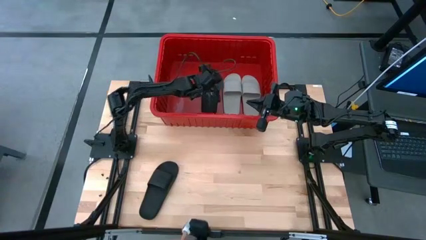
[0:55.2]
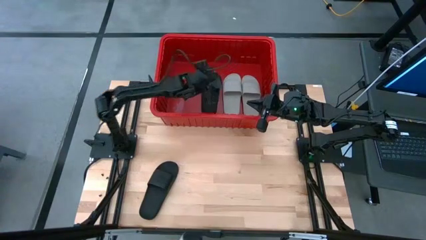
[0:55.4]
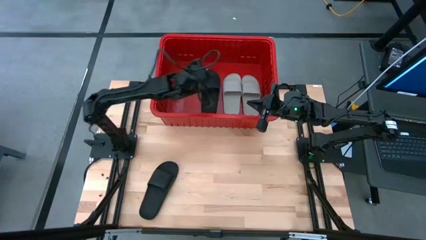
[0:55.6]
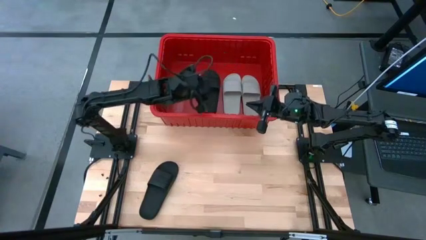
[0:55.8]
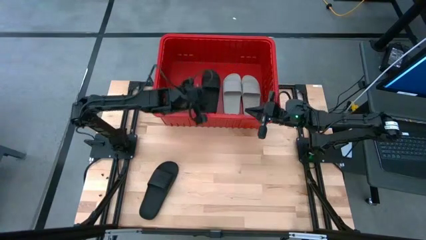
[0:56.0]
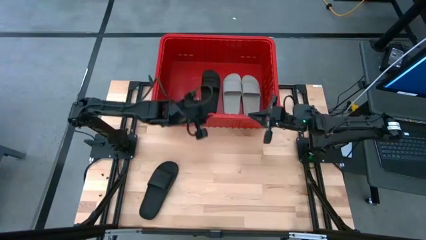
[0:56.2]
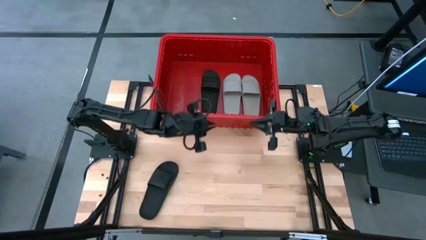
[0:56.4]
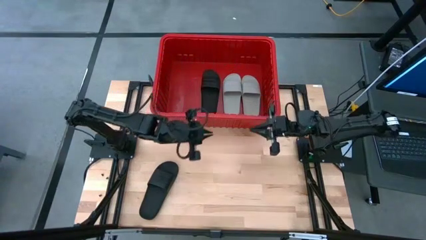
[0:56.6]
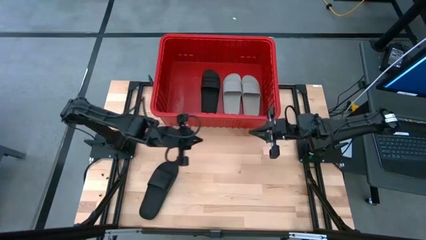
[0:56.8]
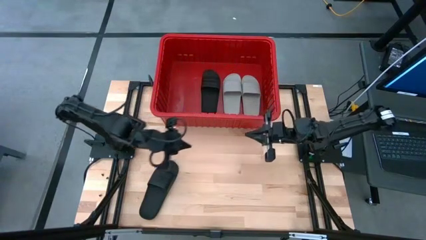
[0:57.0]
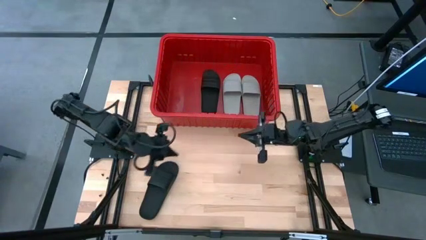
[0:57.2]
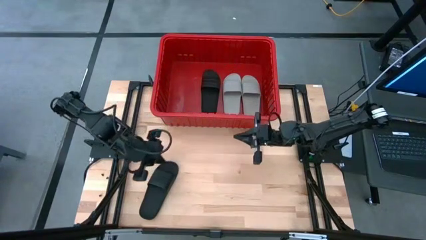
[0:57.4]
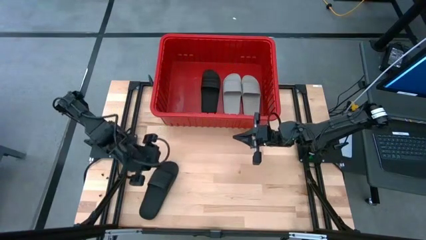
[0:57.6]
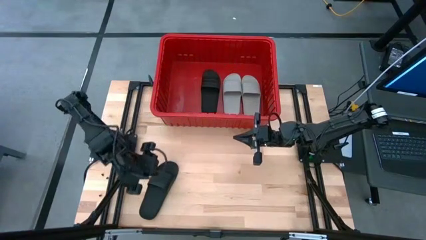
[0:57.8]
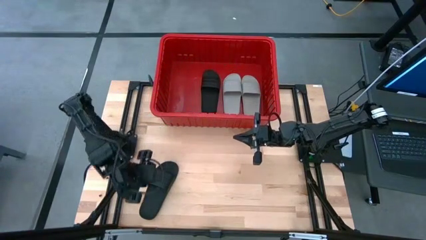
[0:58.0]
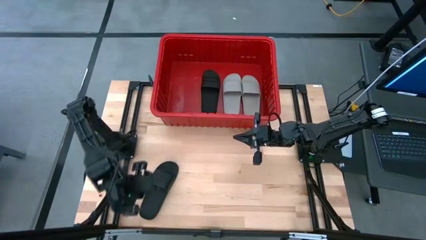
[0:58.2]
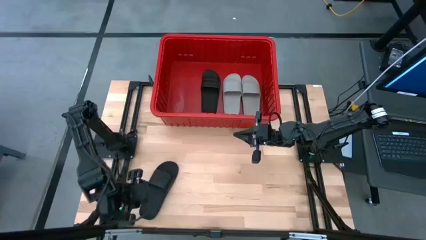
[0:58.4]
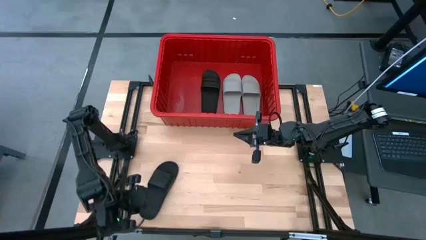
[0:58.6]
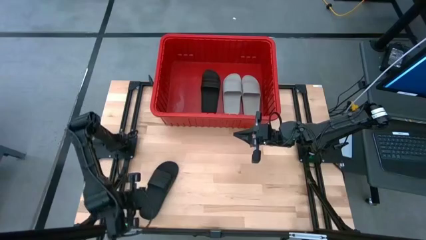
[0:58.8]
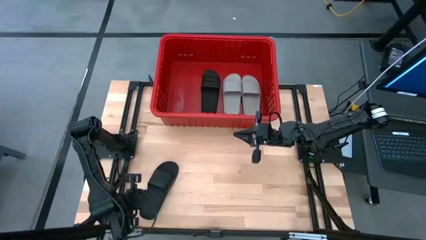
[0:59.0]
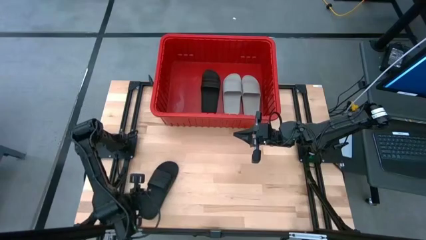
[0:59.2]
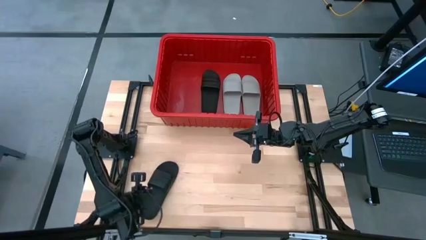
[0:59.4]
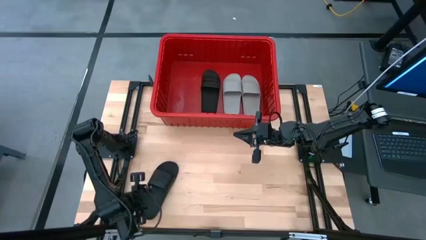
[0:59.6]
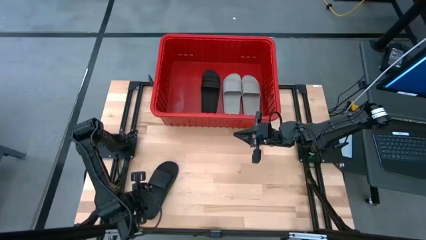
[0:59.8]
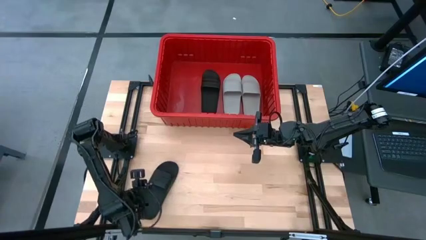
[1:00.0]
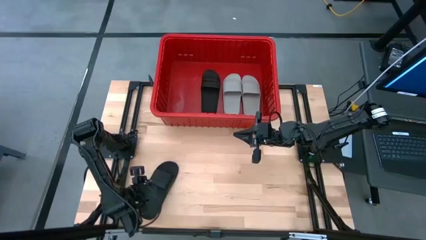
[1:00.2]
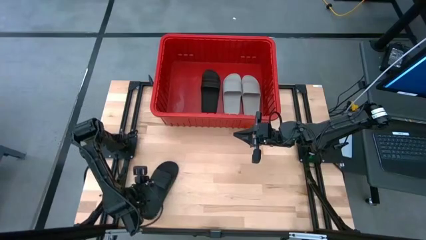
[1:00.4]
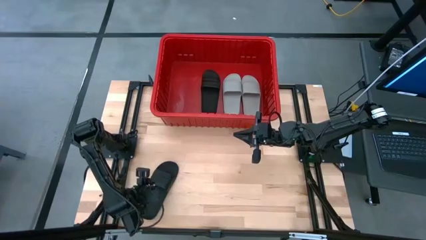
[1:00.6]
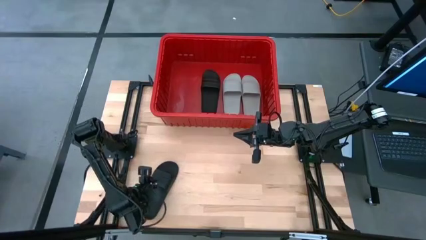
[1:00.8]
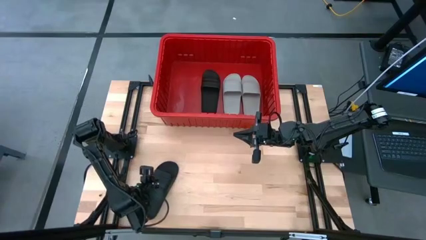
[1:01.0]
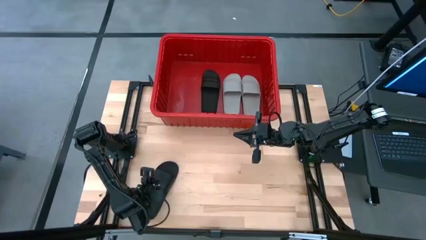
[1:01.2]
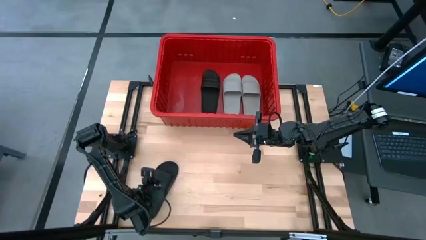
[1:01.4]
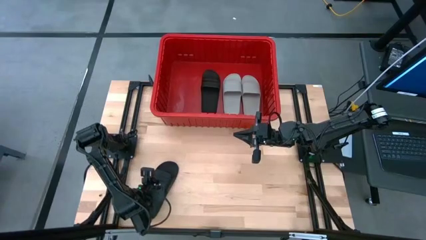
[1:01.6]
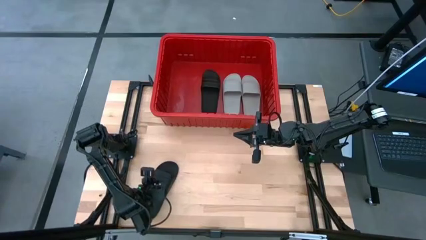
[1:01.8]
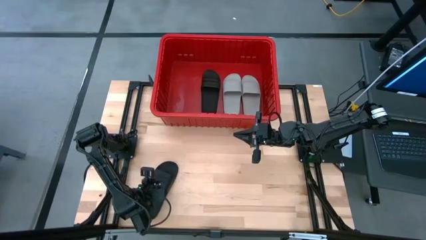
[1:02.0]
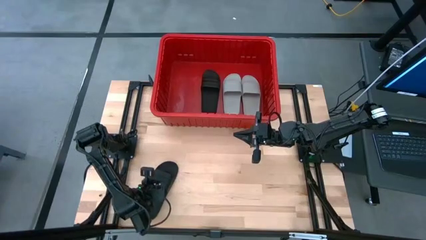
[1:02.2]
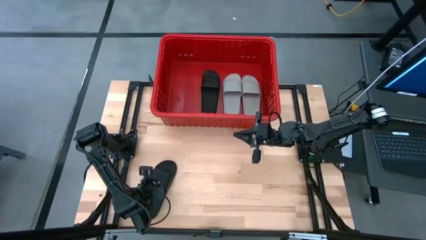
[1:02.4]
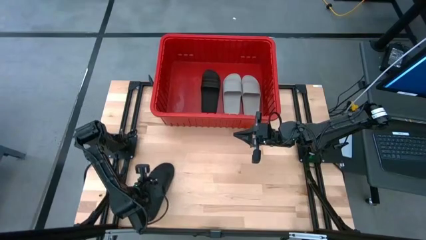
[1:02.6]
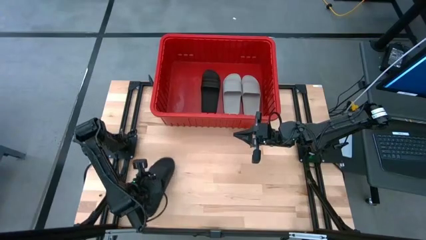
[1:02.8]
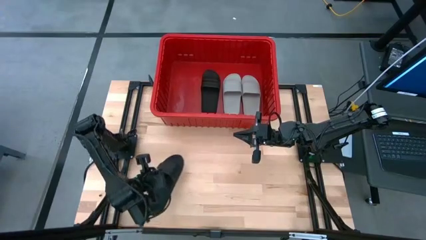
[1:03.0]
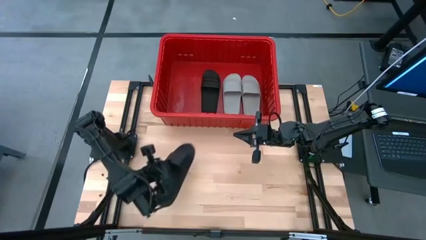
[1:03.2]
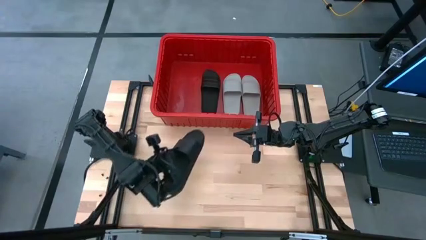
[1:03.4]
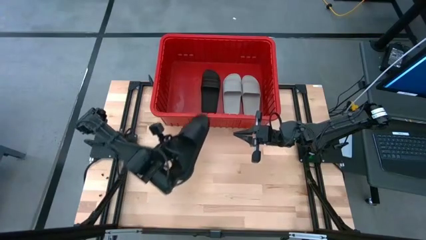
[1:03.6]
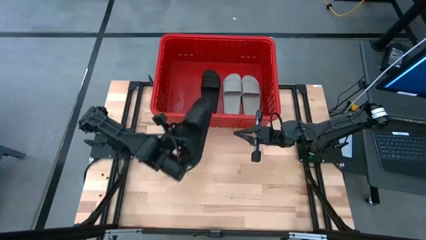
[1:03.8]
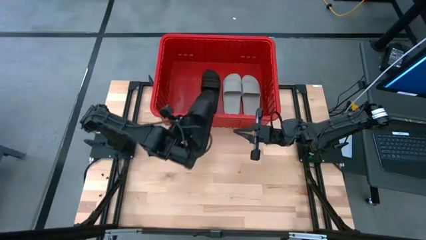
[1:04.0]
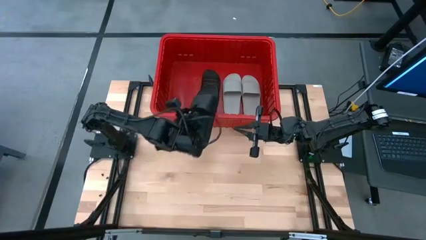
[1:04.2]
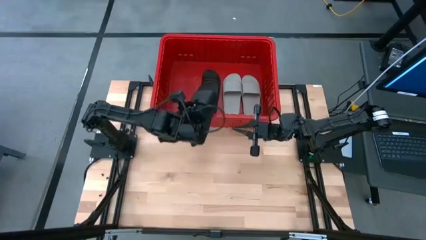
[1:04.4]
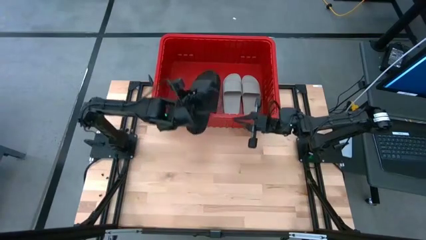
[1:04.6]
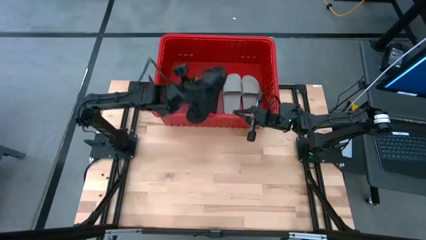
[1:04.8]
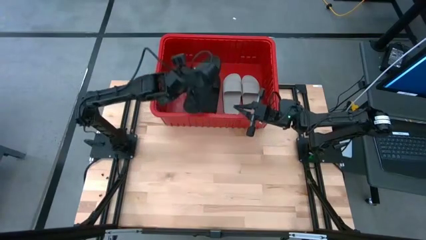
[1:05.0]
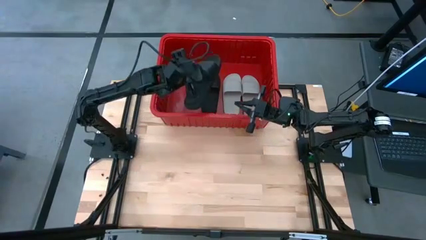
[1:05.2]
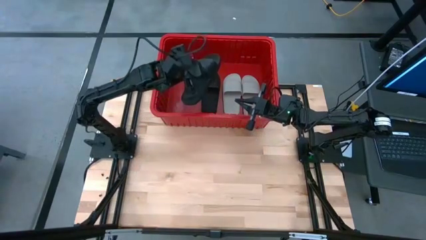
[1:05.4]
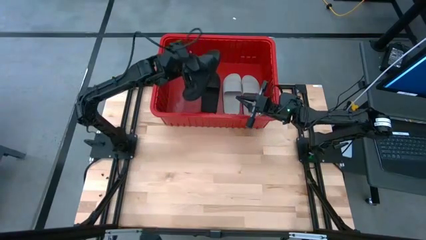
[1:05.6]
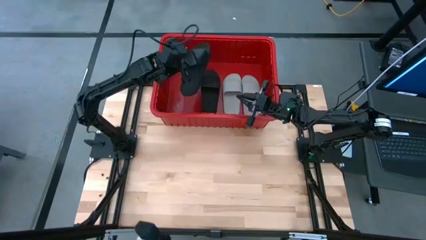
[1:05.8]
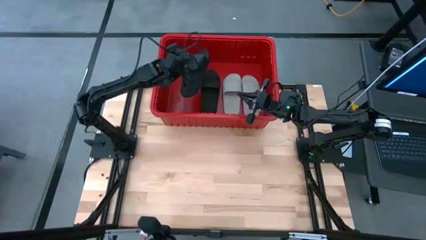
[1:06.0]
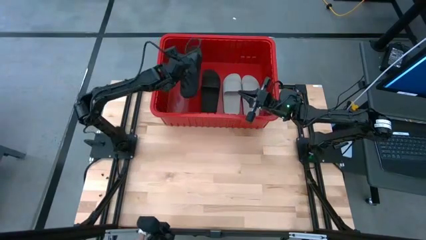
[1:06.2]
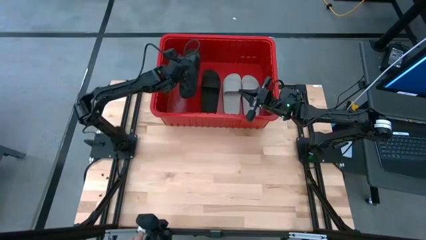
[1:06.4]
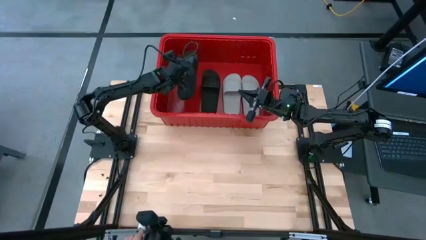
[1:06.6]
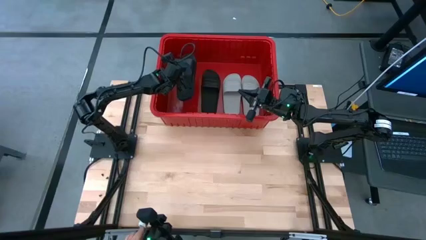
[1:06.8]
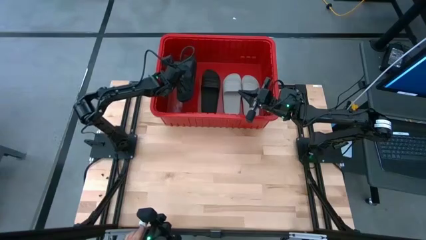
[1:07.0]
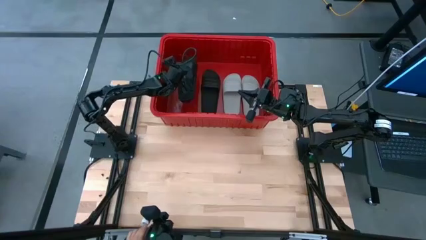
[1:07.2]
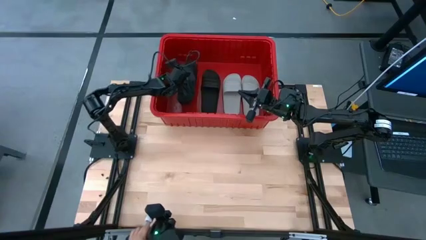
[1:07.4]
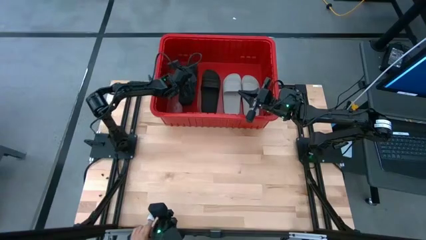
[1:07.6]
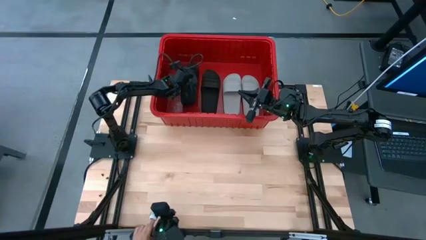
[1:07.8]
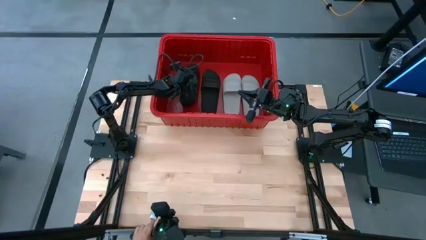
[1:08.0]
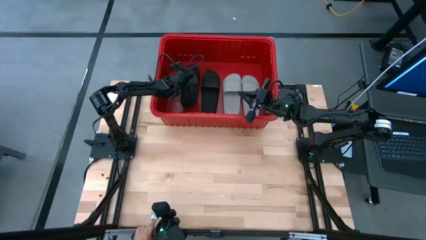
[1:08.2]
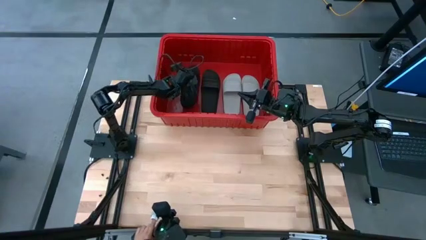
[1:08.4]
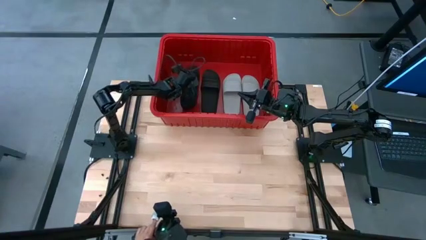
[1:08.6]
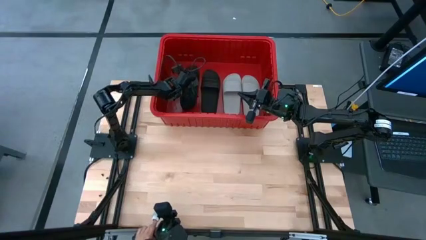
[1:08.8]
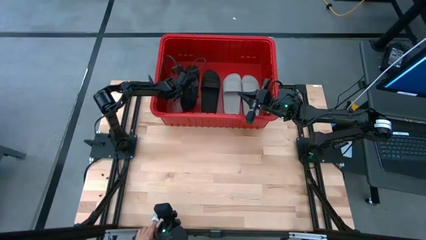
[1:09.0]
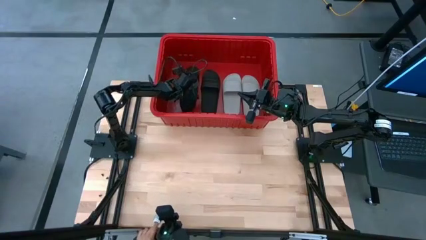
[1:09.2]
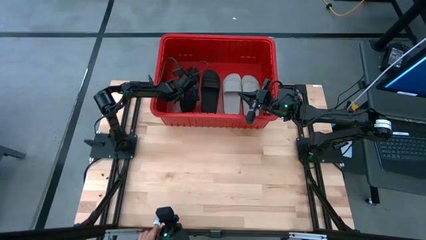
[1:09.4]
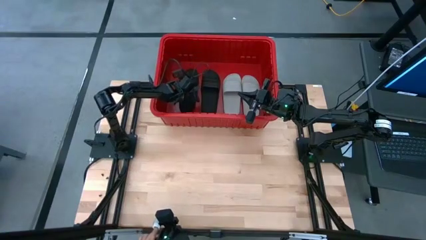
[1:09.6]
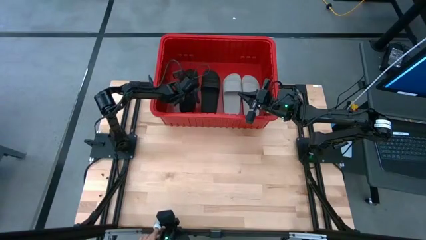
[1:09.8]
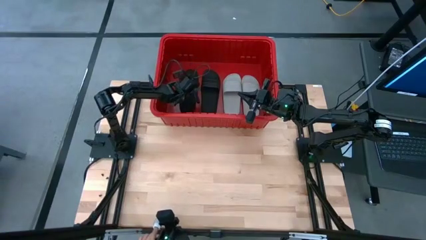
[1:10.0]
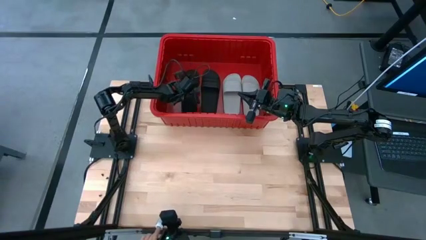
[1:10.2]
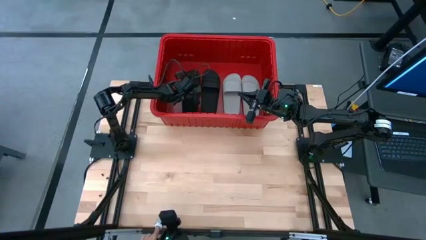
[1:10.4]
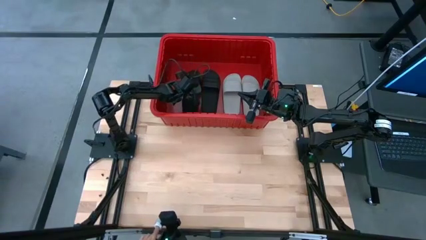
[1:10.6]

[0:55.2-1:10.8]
Task: Pick and place slides into bin
Put the black slide into the red bin
